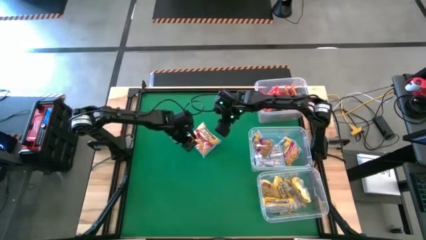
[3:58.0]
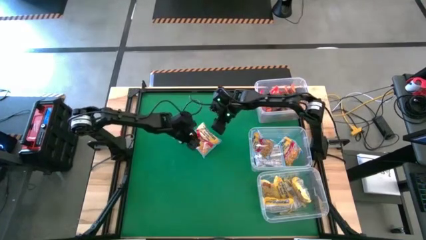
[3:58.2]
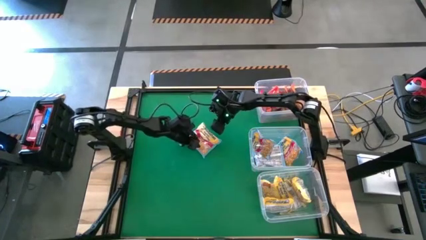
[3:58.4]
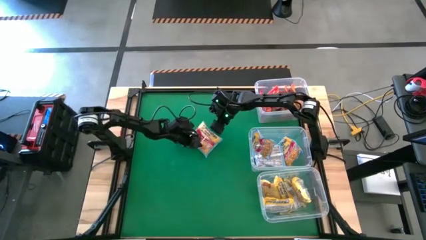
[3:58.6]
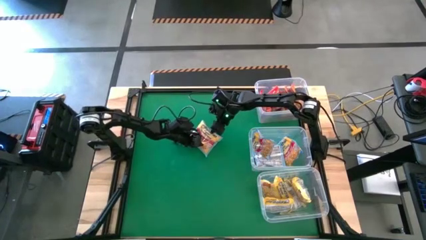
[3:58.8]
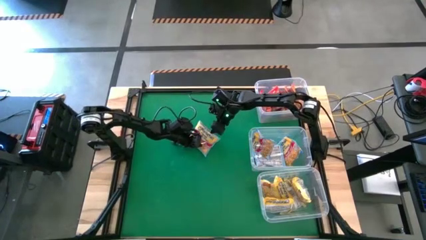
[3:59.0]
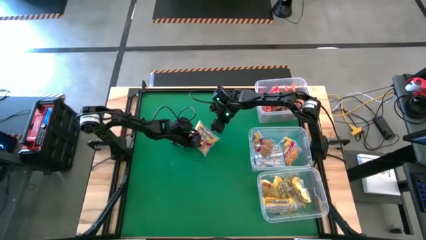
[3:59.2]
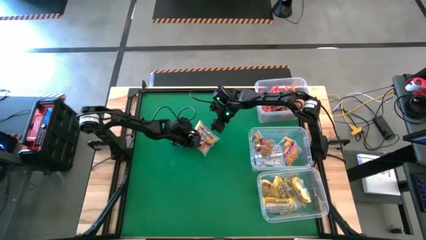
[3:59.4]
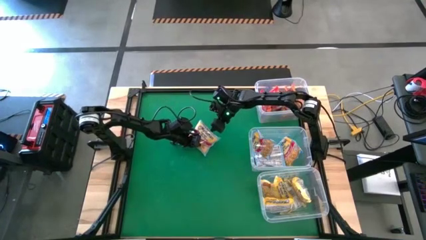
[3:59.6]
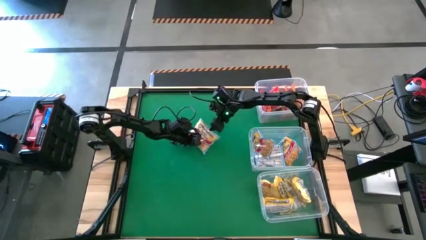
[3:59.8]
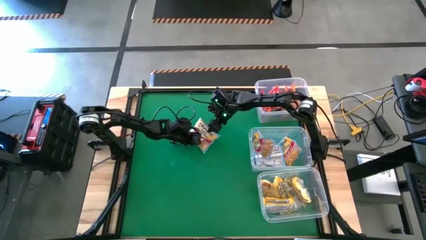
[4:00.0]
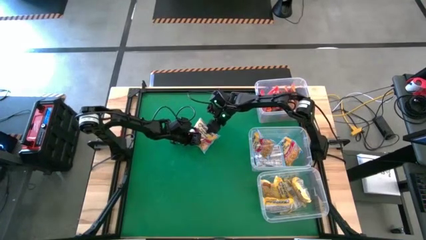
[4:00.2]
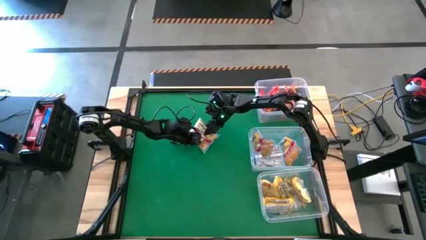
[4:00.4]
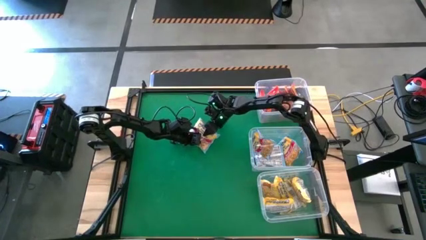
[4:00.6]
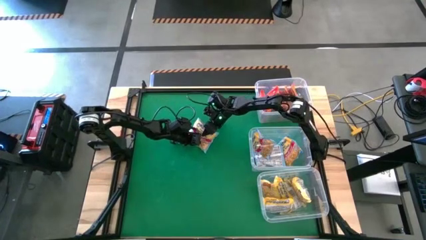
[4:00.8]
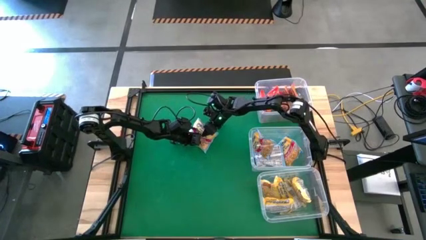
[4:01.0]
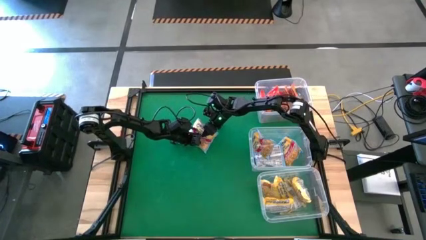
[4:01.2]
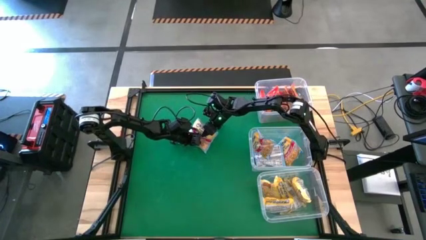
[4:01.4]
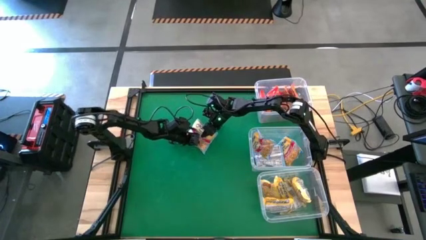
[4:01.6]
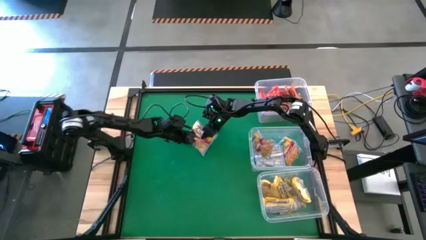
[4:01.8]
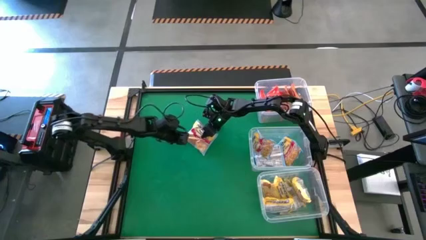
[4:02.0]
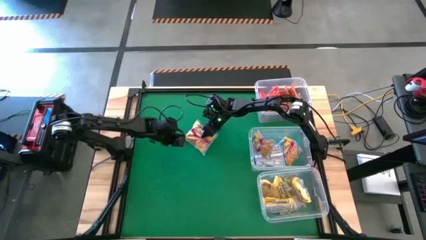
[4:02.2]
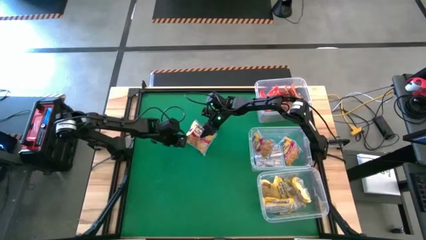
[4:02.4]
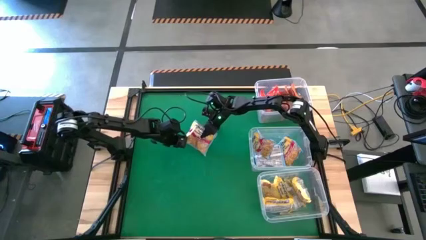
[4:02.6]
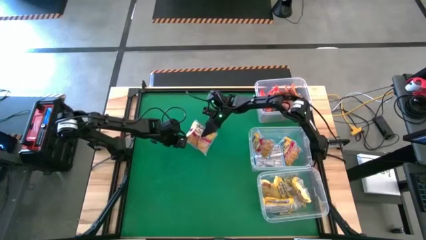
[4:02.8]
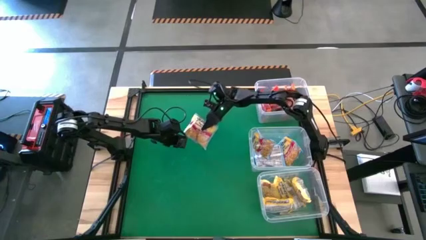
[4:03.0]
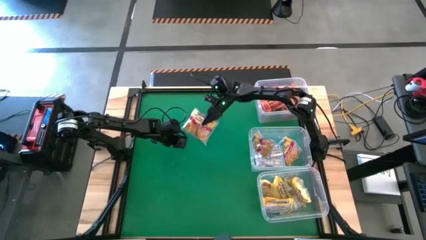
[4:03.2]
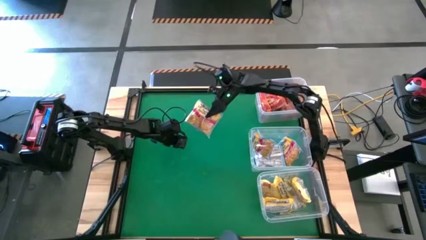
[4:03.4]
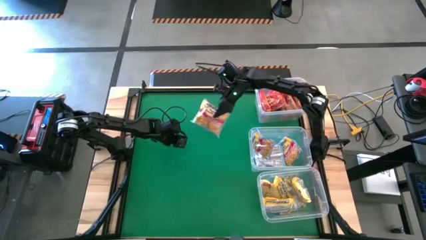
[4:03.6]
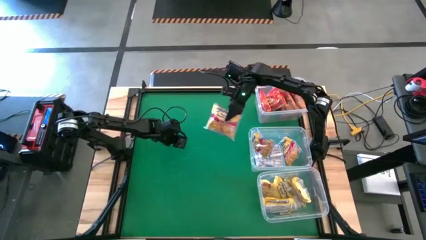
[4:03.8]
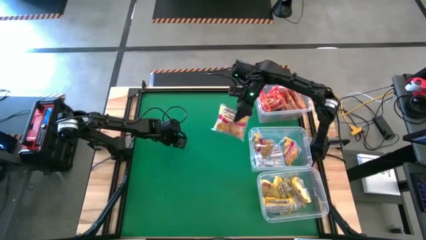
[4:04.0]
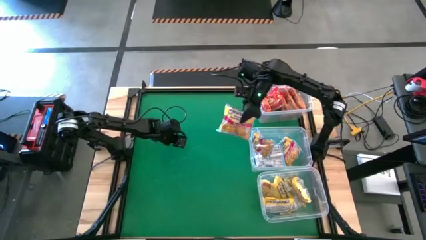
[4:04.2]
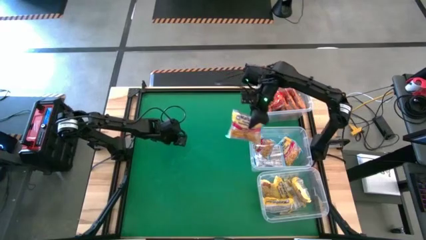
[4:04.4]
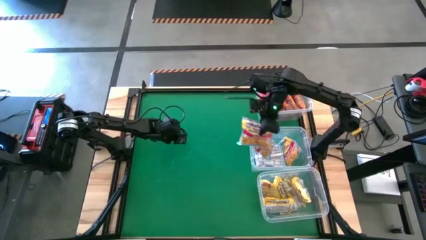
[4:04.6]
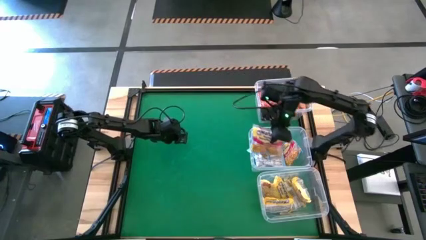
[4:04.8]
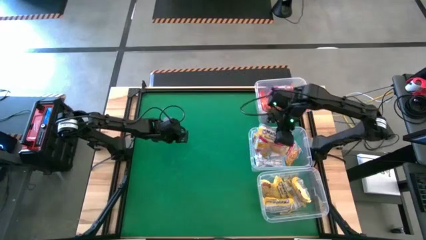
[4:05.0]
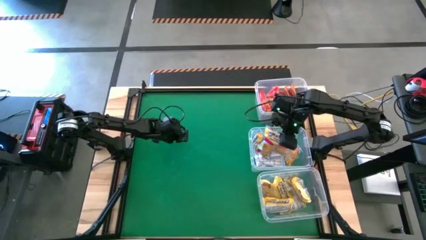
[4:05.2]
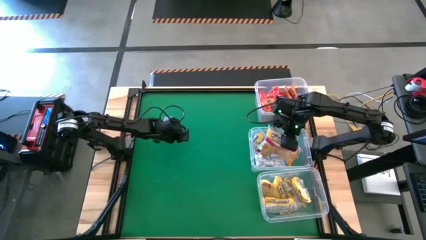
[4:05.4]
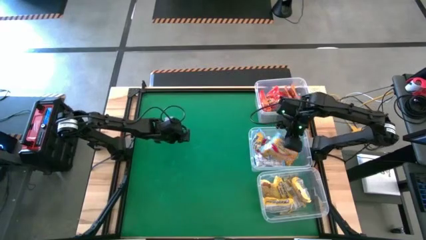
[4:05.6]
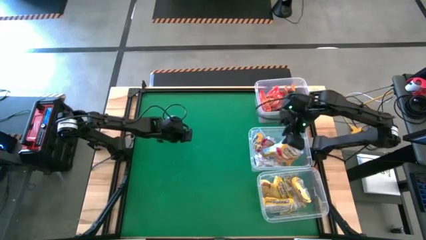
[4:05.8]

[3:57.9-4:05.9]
Task: Sort Maruchan noodles
Put the blue noodle pack into the middle transparent bin

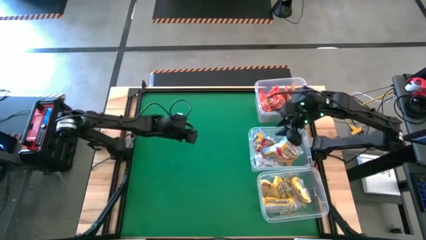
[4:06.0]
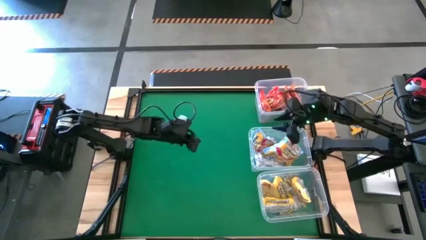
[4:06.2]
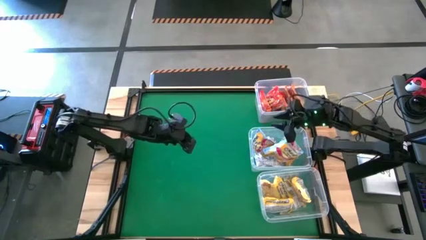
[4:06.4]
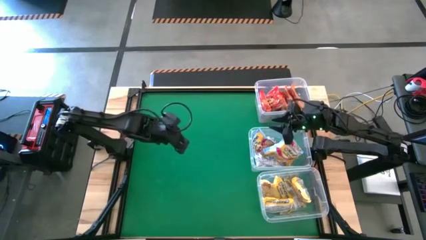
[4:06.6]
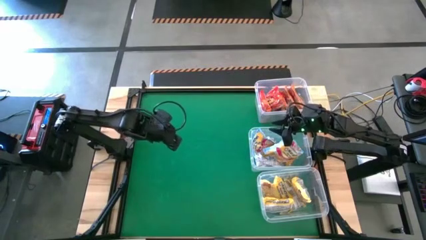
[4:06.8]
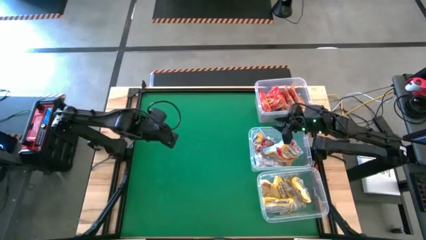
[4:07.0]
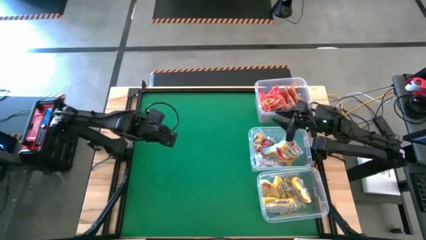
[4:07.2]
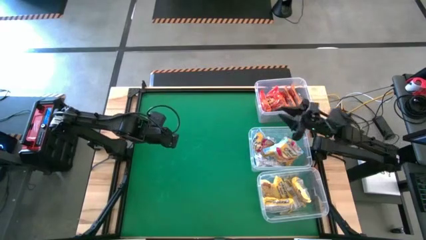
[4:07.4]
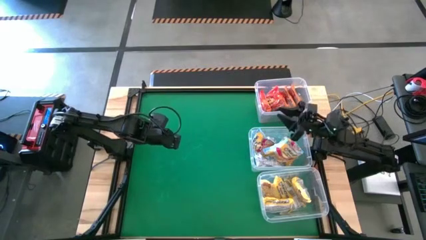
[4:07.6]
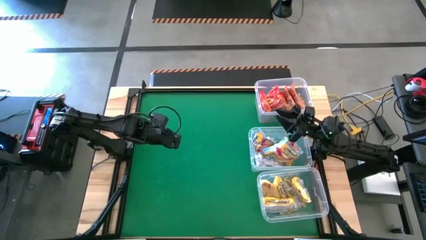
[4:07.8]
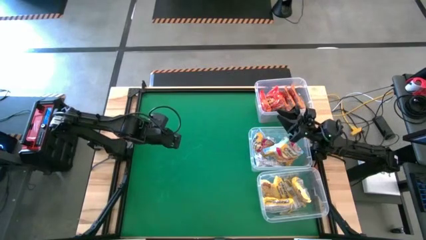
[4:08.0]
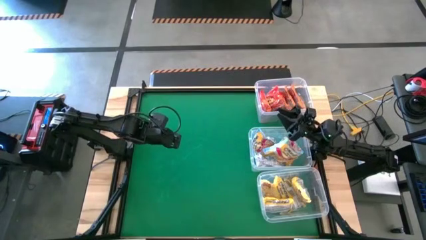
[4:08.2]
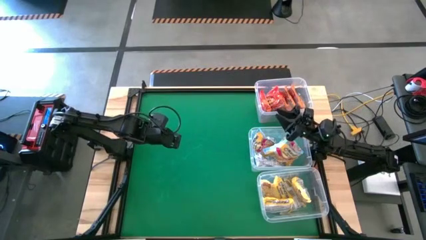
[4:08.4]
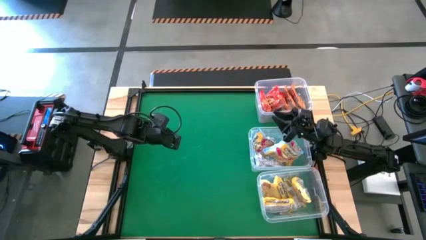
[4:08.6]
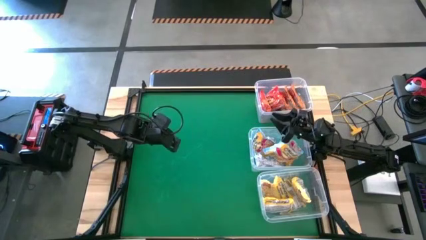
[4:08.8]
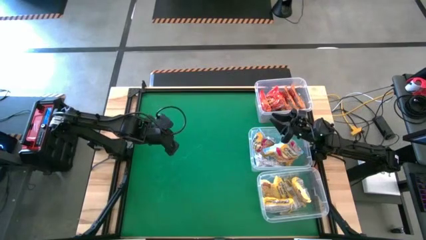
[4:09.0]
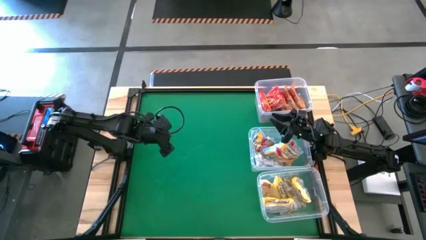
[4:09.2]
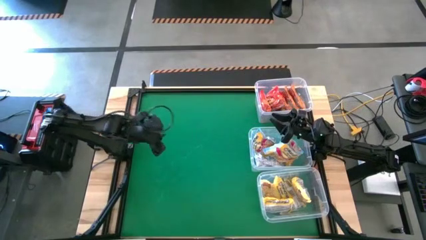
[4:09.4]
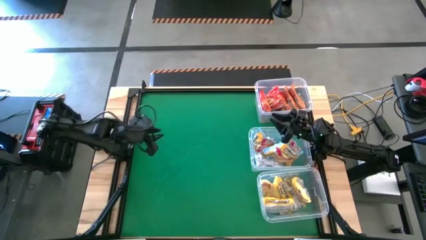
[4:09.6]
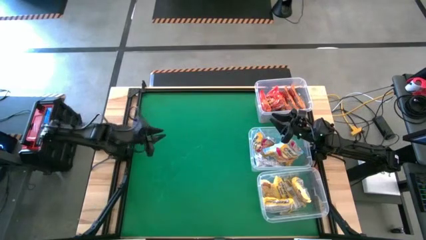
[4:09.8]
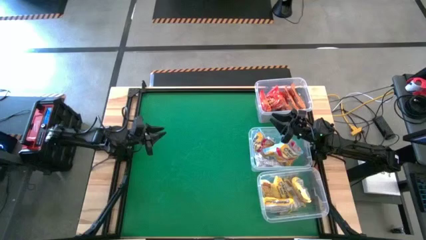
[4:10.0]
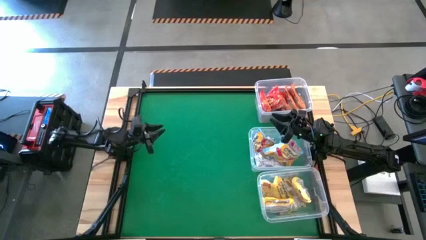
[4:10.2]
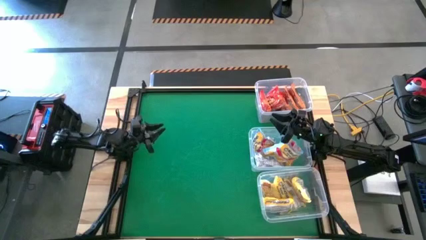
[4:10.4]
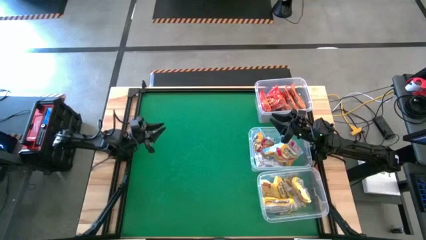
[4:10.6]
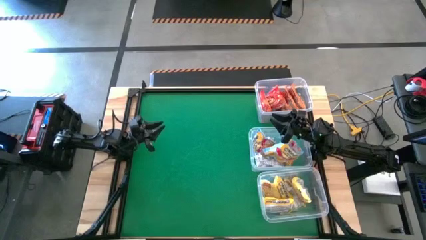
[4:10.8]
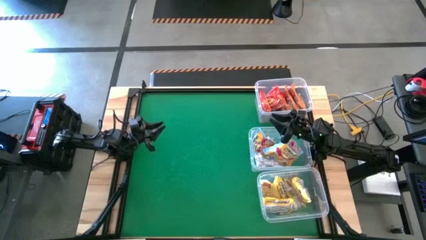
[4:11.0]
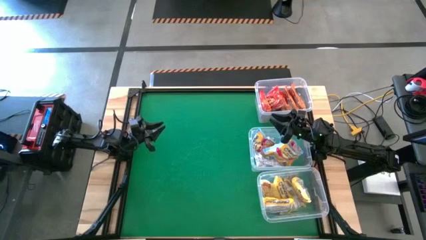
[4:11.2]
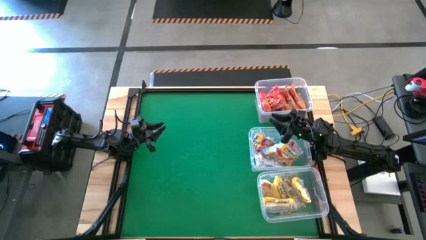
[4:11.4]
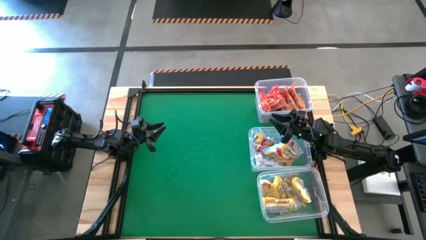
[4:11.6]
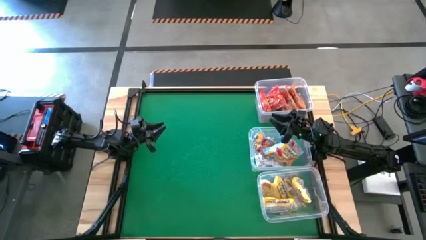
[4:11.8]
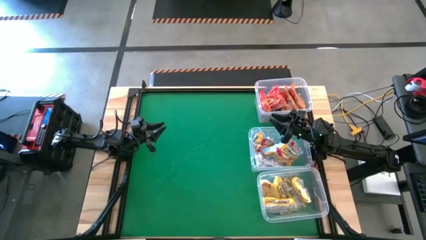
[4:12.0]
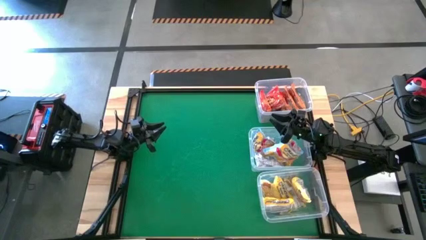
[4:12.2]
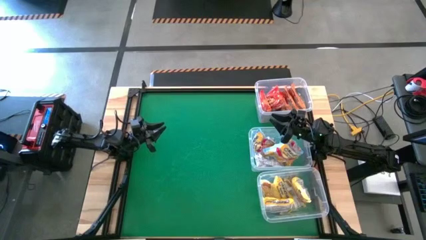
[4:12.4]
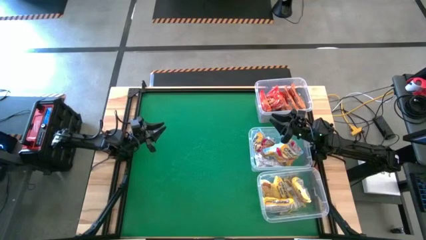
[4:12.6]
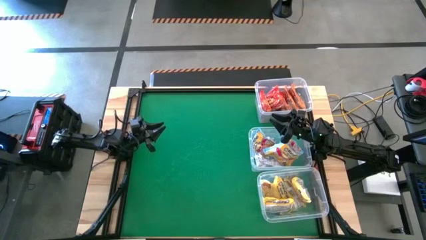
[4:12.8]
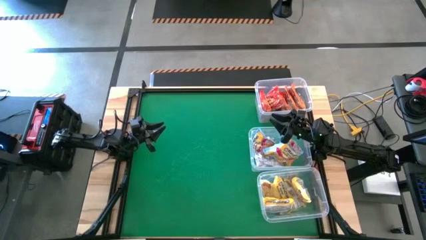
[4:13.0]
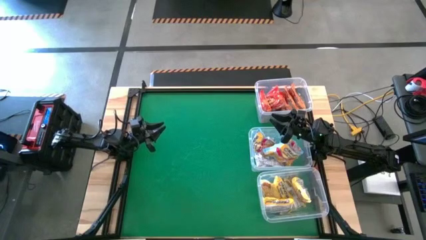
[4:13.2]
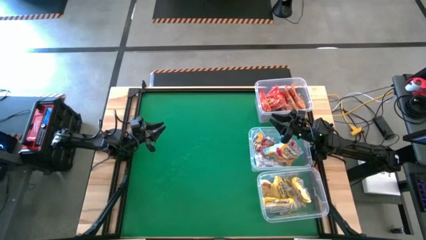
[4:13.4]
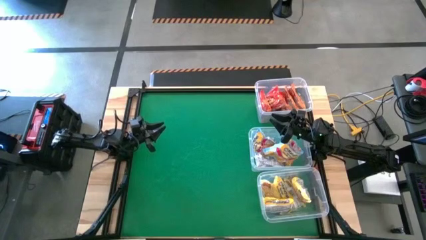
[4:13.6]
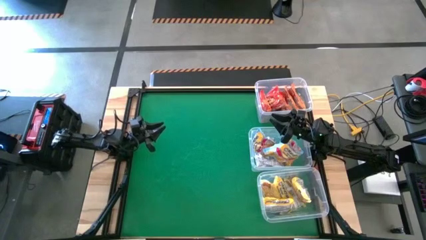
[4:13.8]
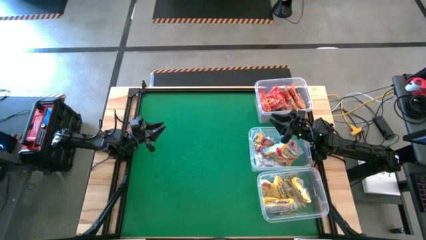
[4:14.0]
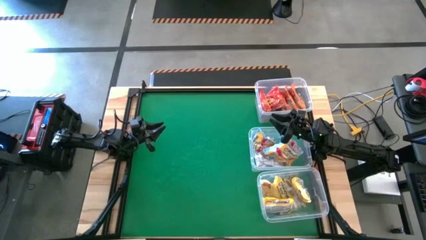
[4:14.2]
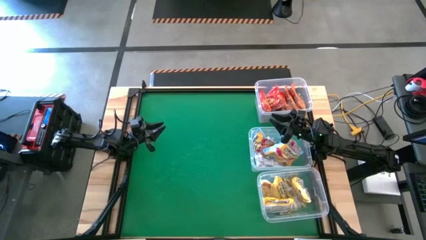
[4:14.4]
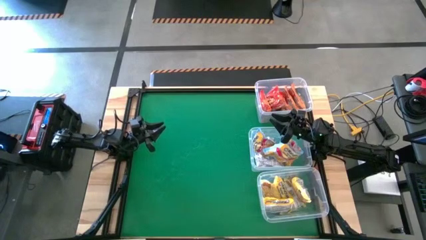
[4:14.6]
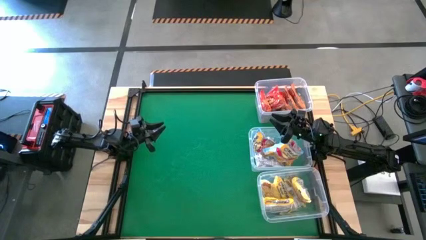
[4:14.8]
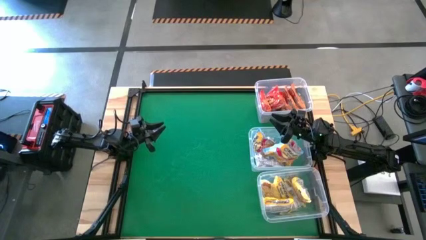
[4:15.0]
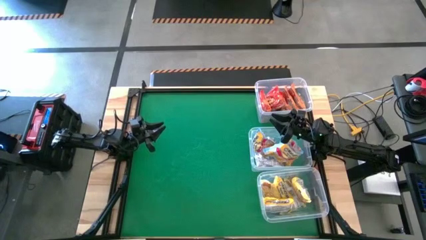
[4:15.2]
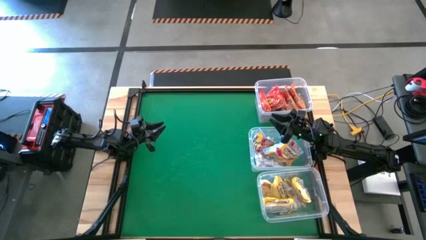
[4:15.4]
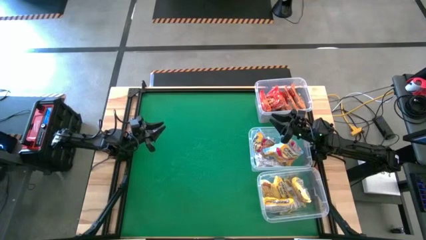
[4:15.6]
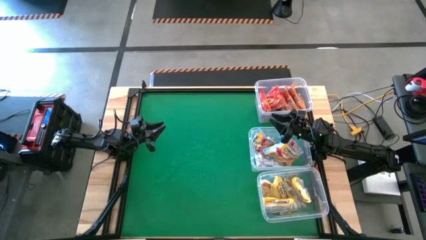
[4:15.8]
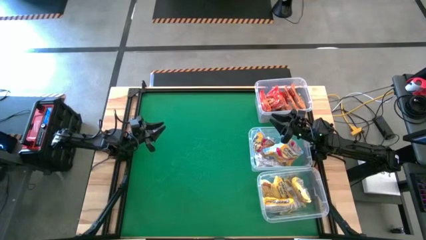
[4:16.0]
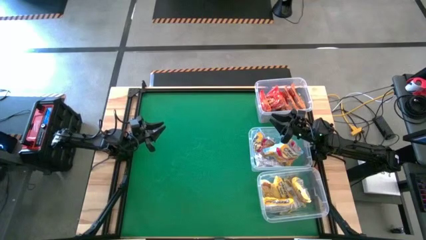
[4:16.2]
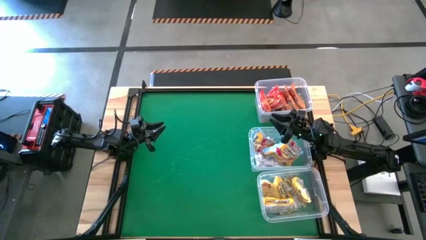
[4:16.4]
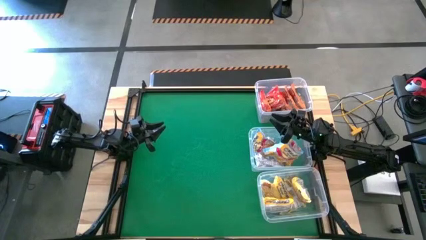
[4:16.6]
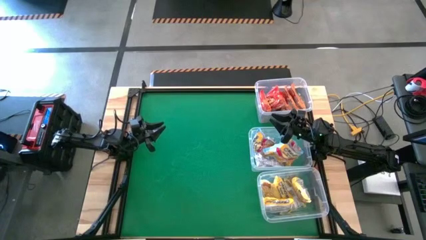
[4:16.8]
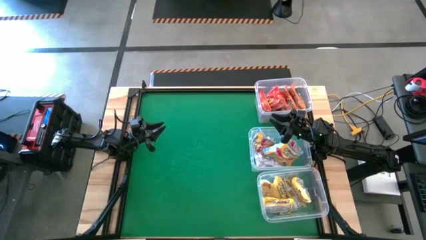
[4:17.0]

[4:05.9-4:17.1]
Return to Home Position
